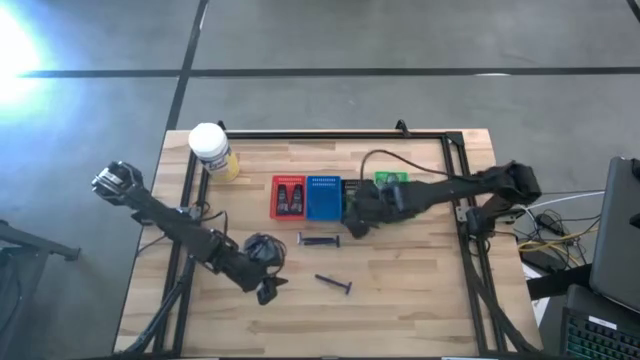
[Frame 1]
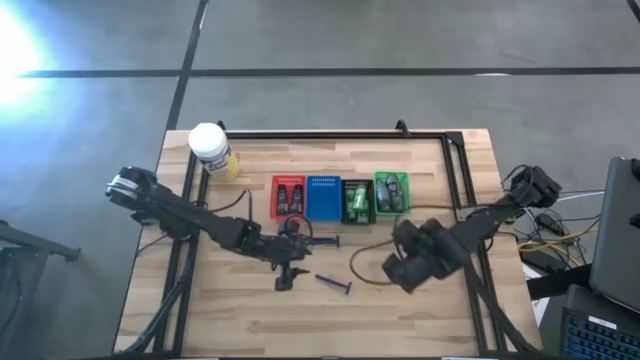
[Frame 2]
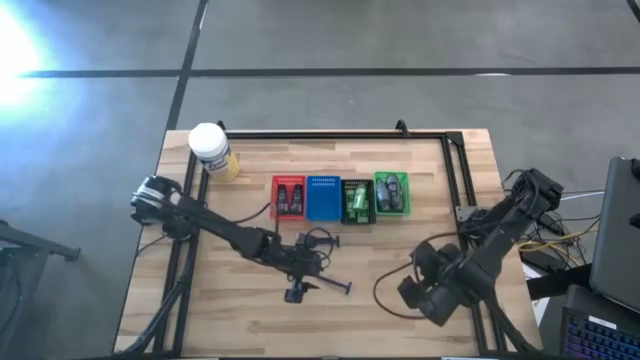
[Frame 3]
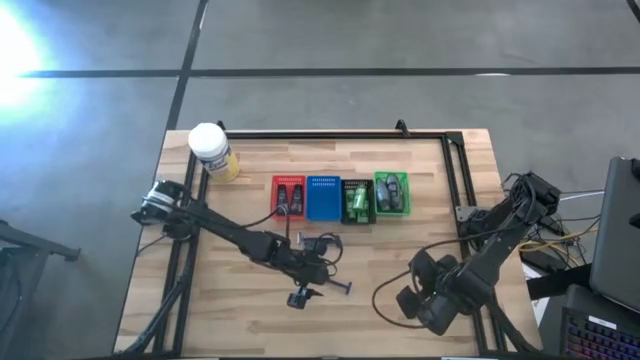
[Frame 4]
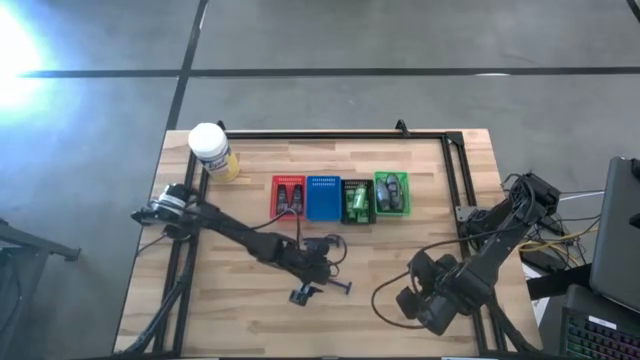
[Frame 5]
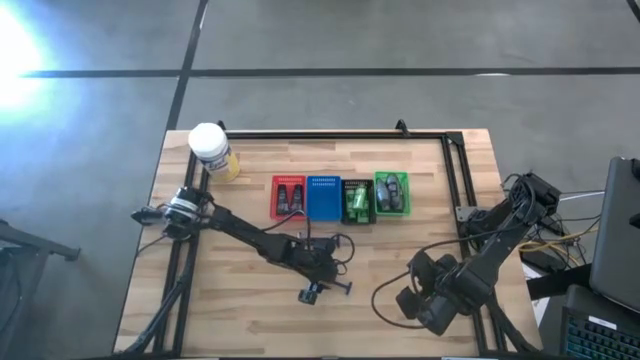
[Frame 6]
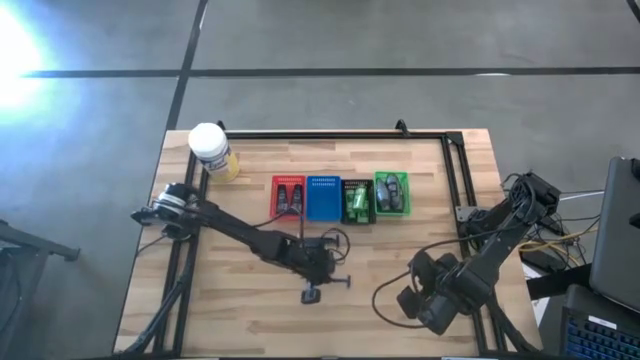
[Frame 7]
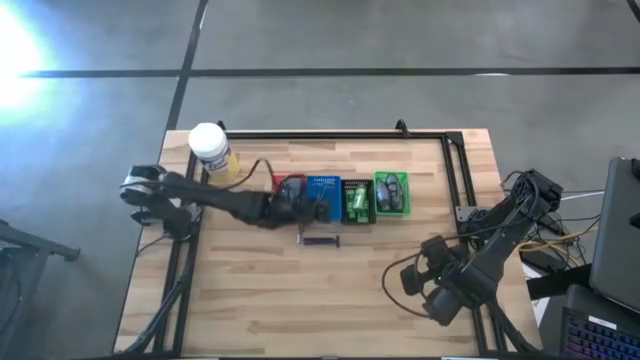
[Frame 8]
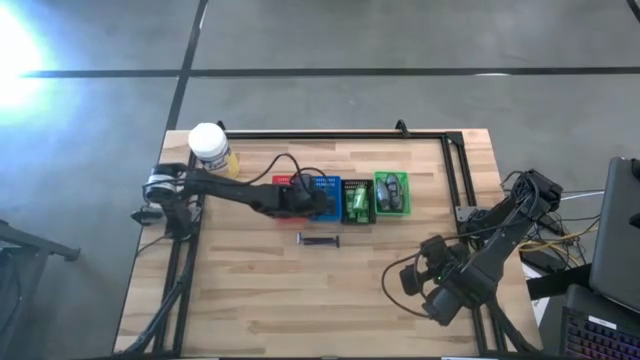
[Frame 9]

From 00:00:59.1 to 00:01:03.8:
Task: Pick & Place Travel size toiletries
Put the razor into the blue basket

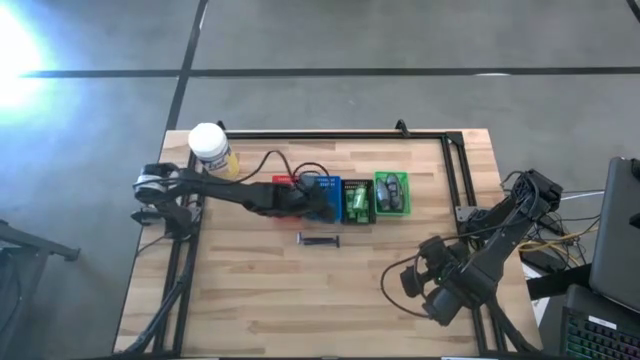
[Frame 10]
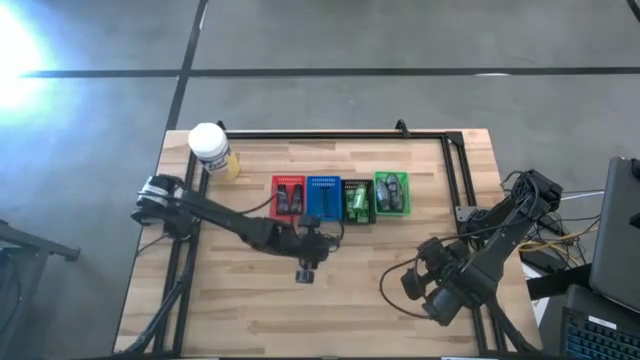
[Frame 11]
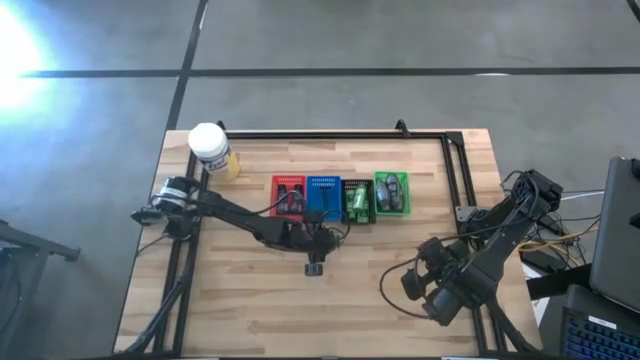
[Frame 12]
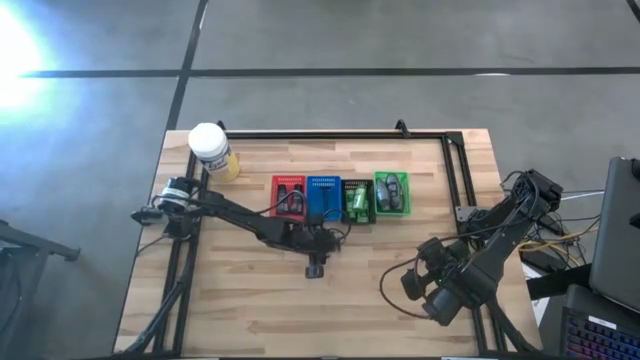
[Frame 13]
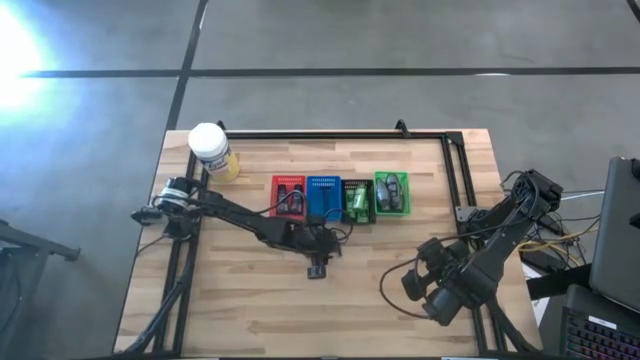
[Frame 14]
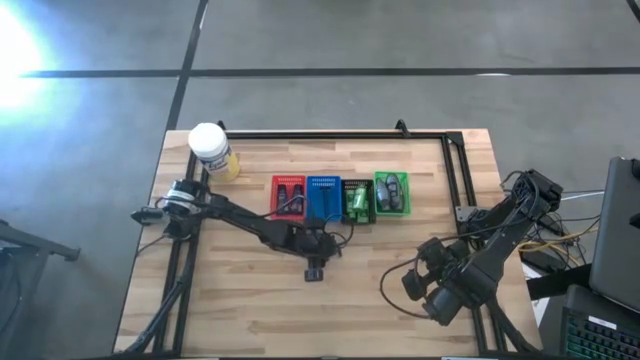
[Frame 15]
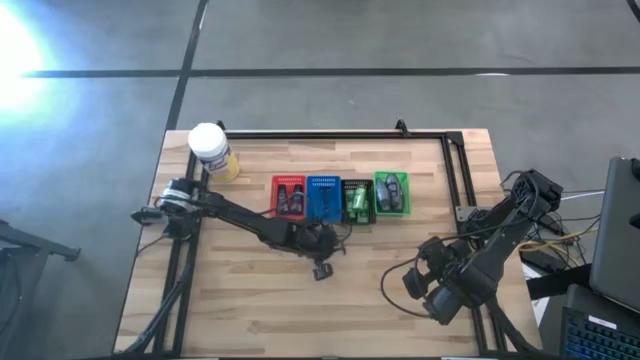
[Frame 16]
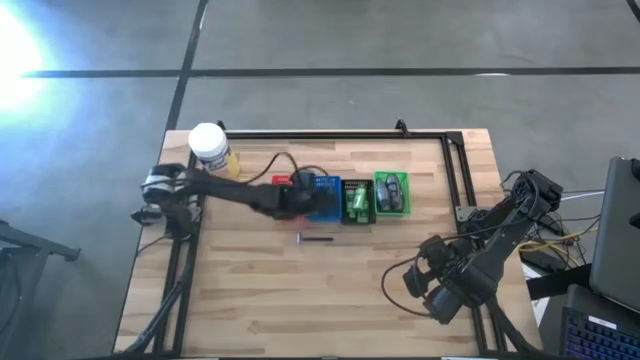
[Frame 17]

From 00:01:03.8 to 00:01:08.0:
Put the razor into the blue basket

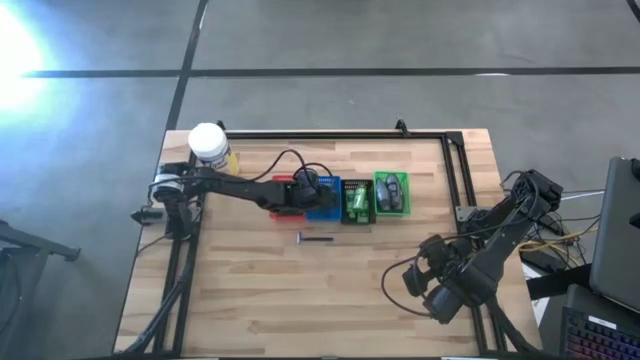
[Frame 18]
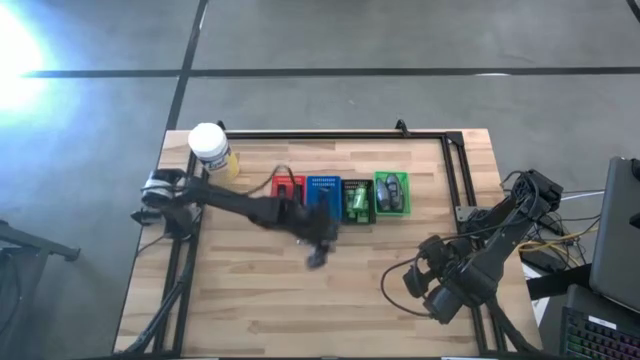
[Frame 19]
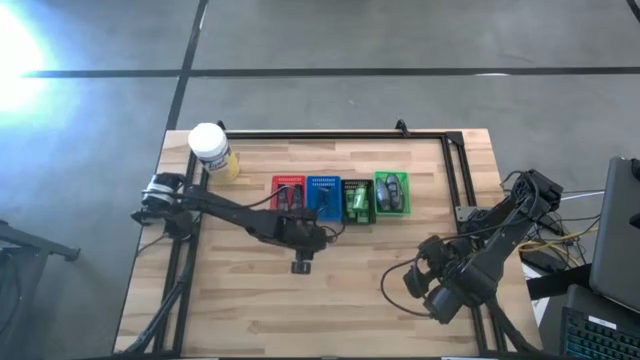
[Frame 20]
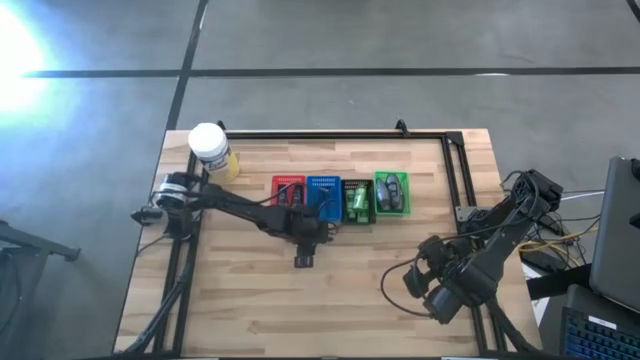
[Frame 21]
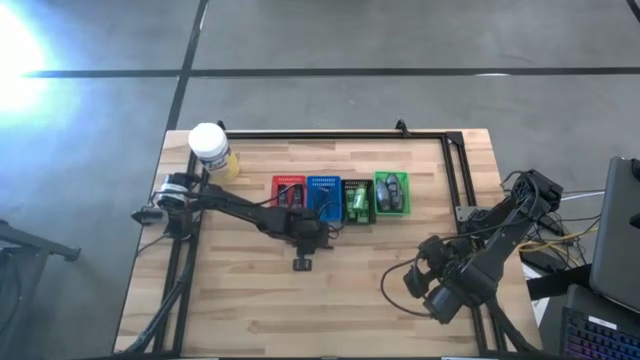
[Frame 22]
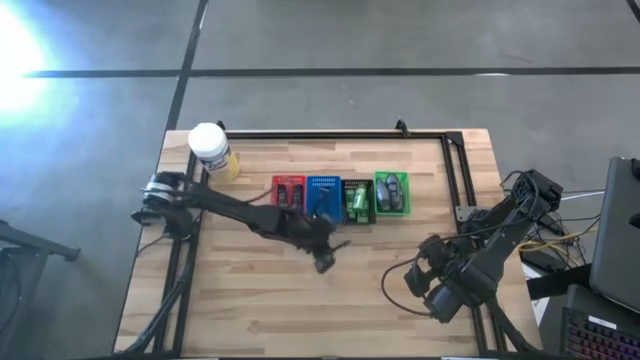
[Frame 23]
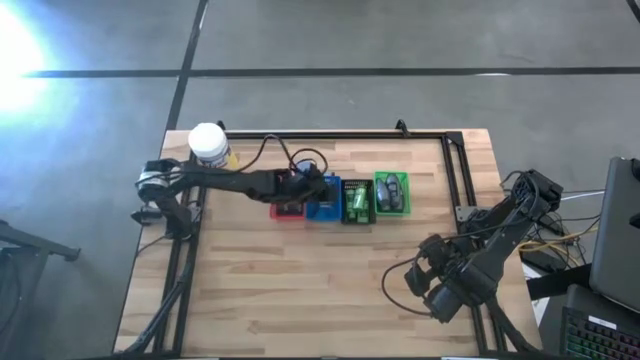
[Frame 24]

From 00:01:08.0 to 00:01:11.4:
Put the razor into the blue basket

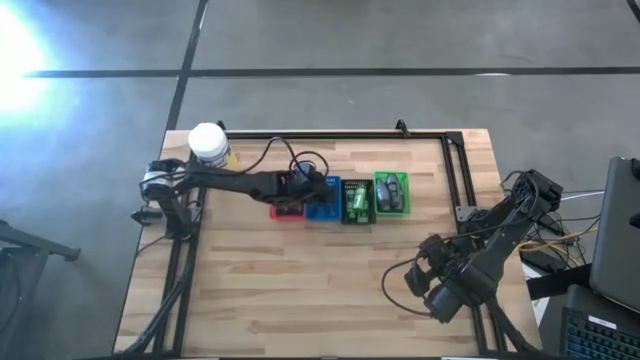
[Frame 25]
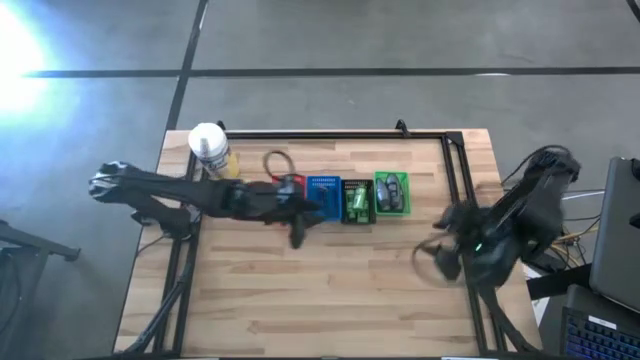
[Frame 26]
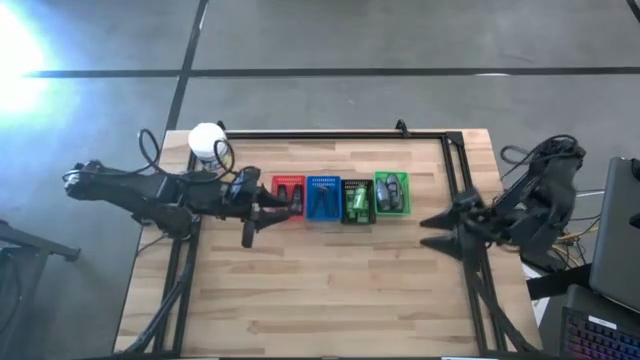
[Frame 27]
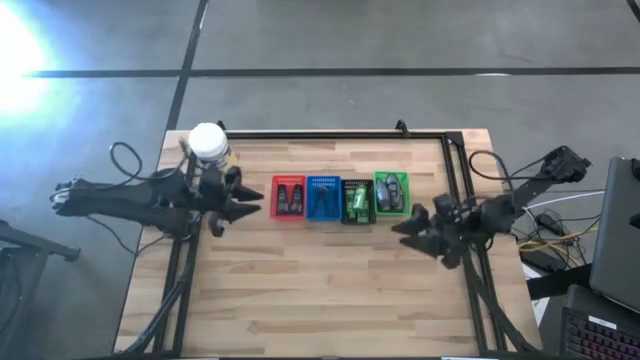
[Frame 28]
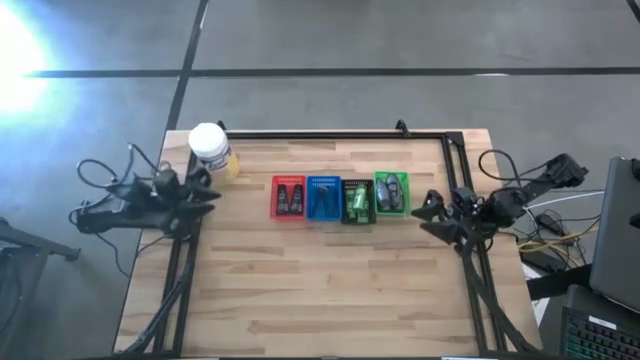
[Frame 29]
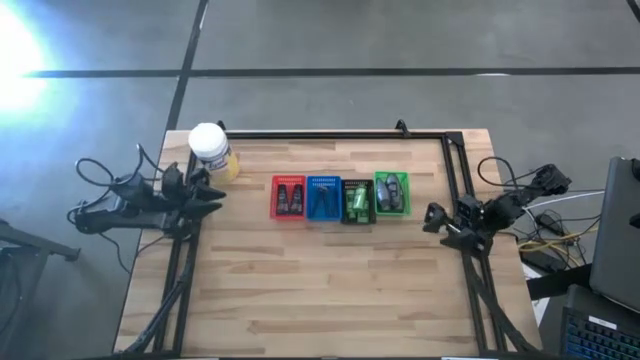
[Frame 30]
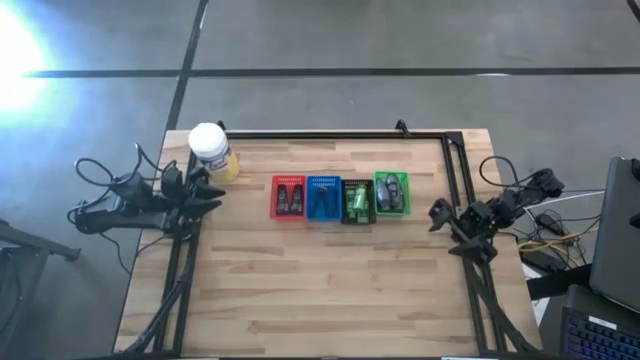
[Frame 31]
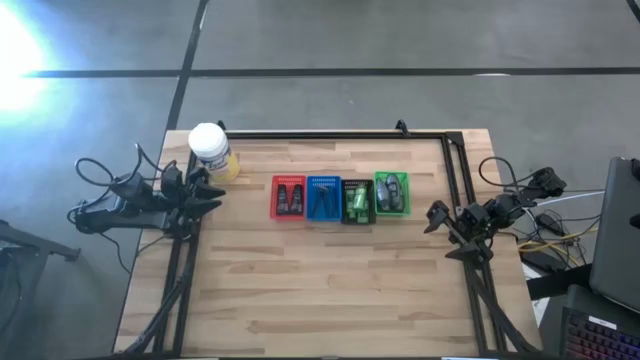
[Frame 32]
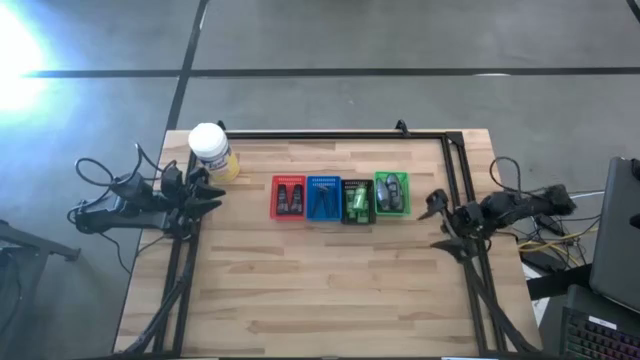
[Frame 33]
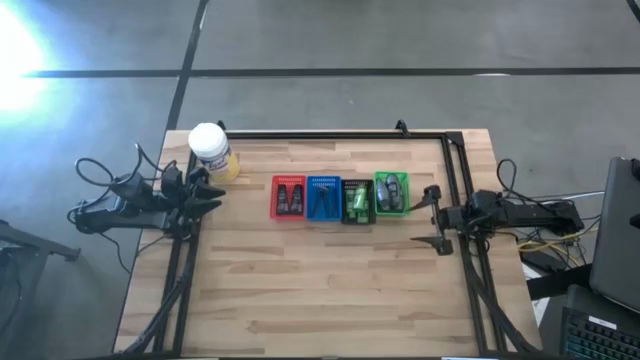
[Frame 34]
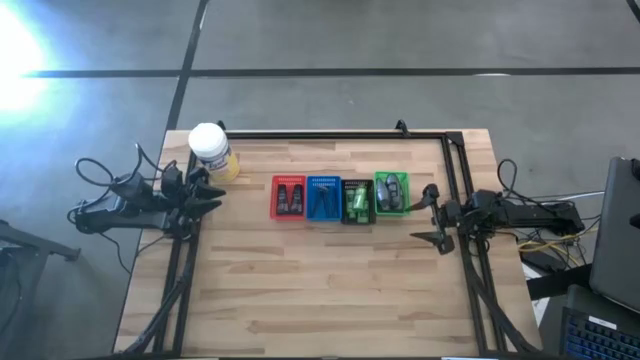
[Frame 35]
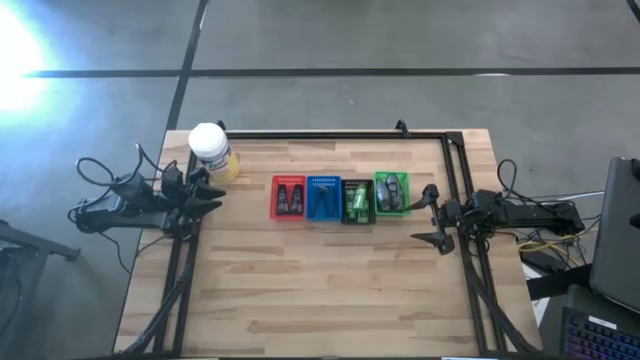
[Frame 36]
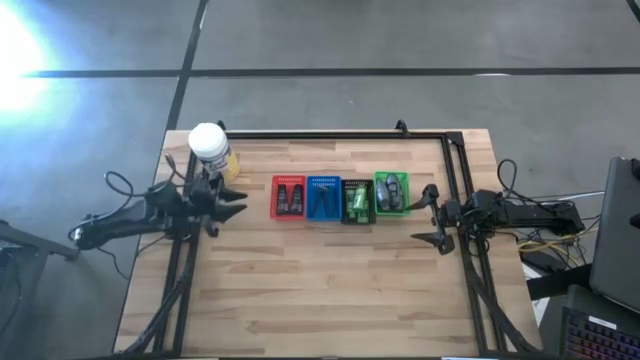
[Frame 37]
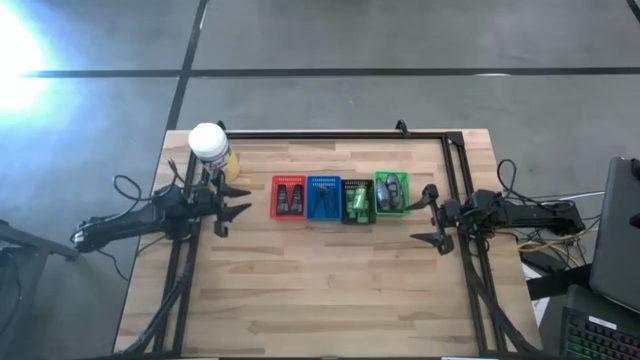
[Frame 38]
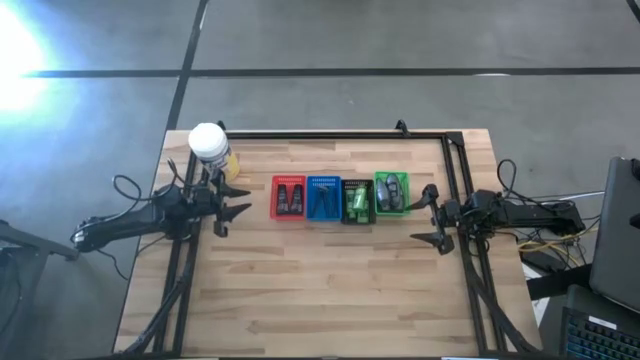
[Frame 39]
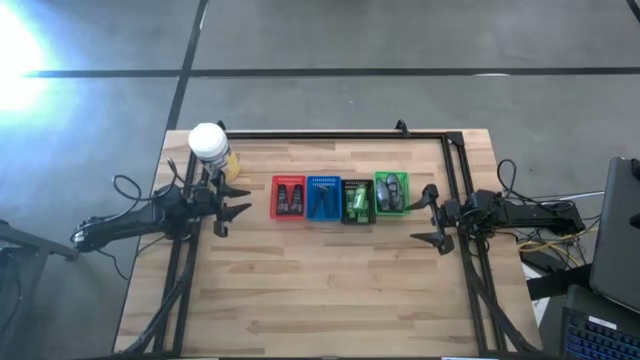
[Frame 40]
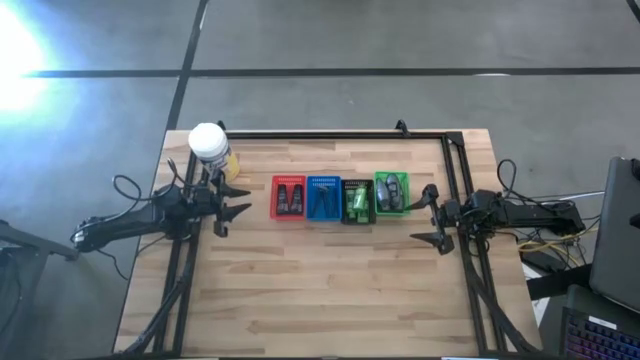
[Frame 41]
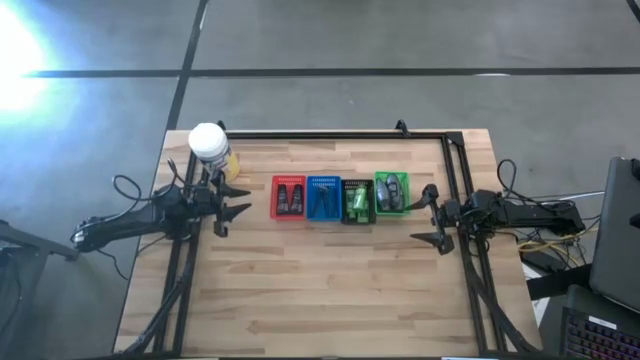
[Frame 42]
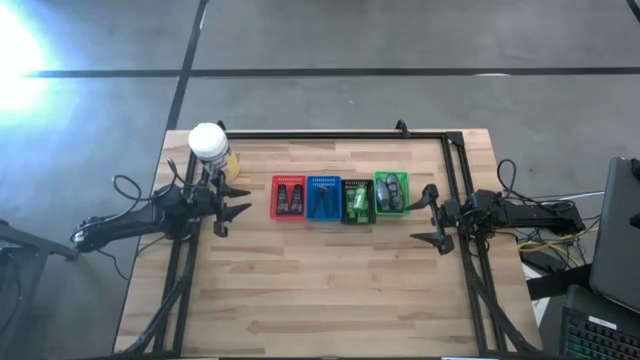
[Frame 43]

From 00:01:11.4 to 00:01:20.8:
Return to Home Position
